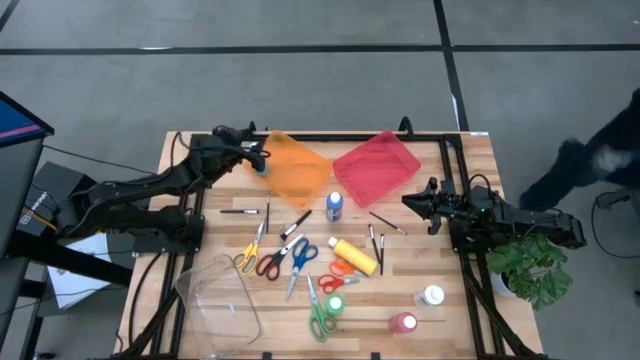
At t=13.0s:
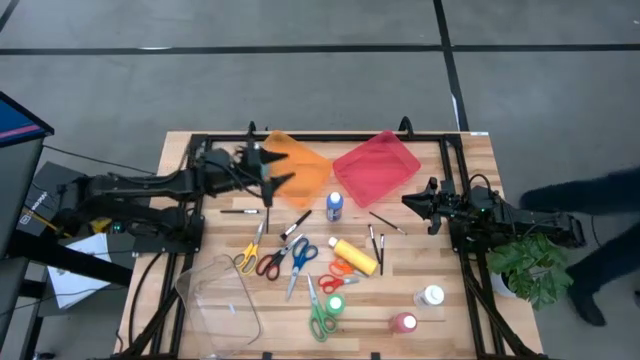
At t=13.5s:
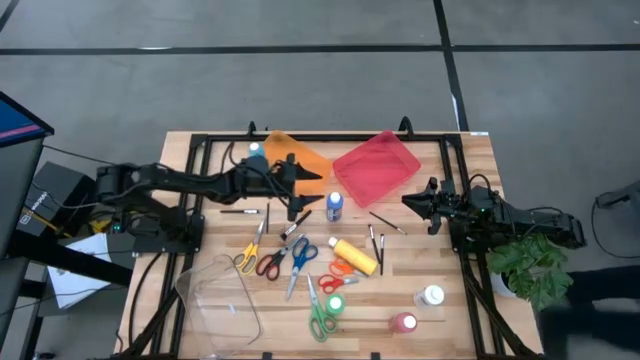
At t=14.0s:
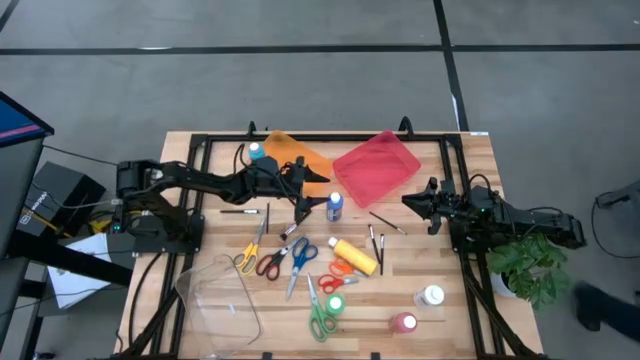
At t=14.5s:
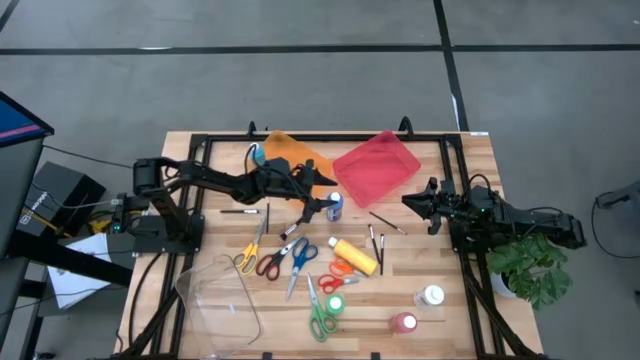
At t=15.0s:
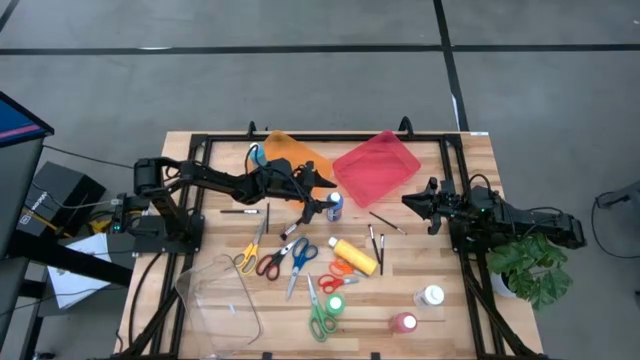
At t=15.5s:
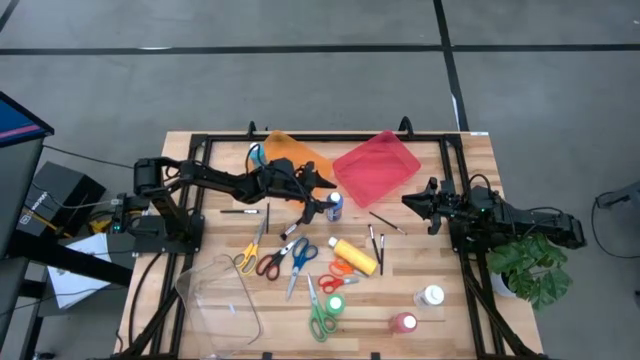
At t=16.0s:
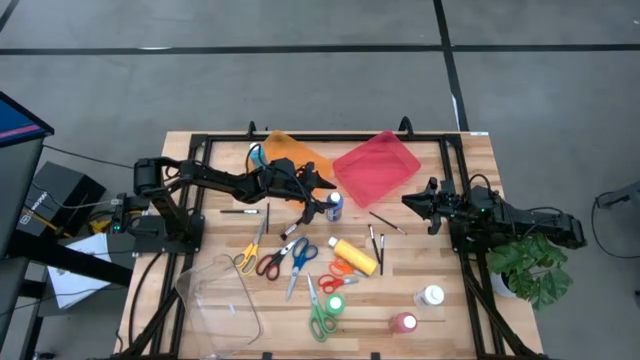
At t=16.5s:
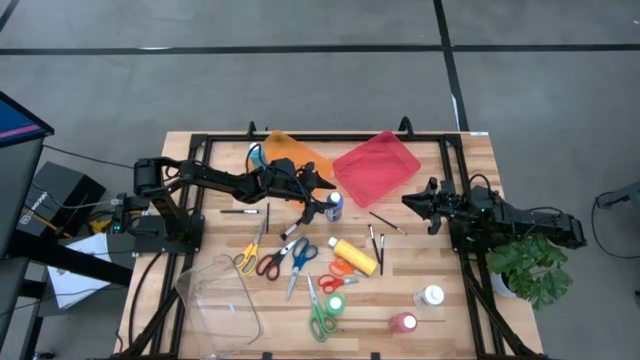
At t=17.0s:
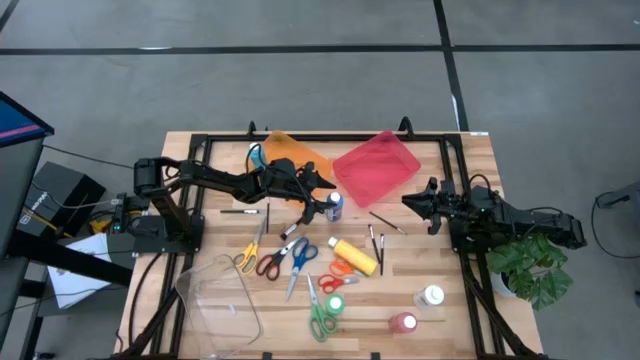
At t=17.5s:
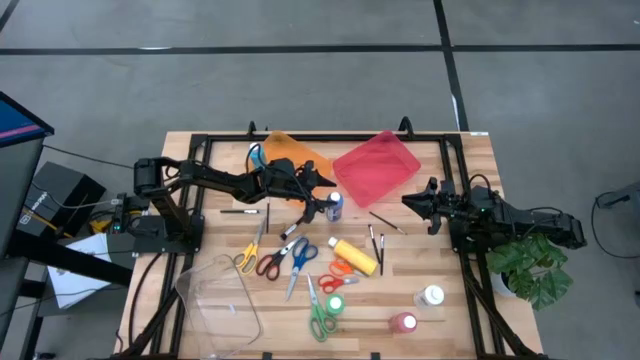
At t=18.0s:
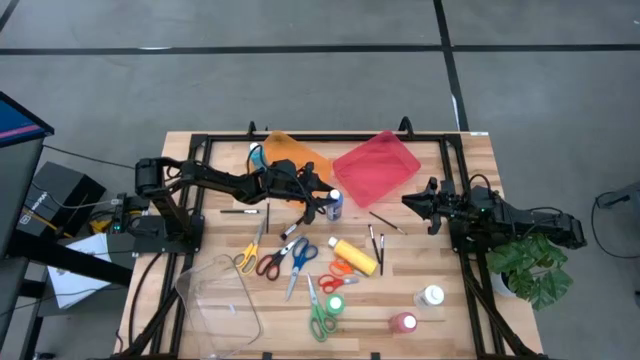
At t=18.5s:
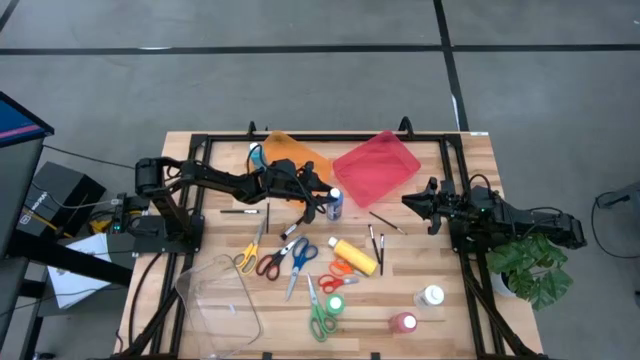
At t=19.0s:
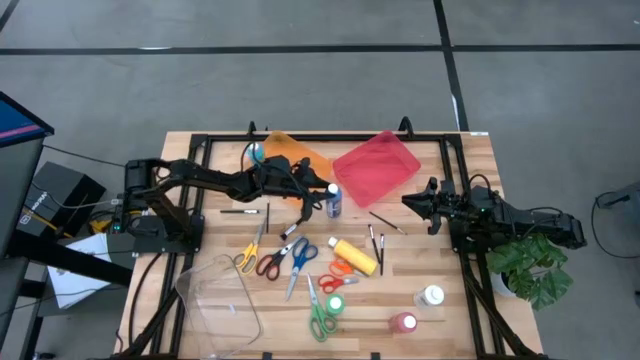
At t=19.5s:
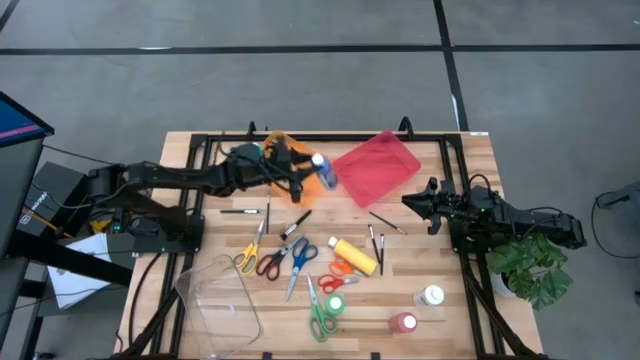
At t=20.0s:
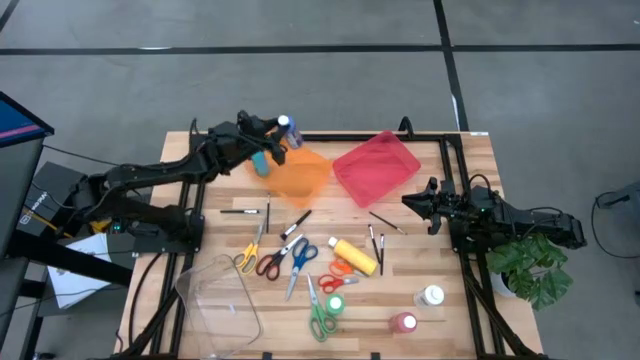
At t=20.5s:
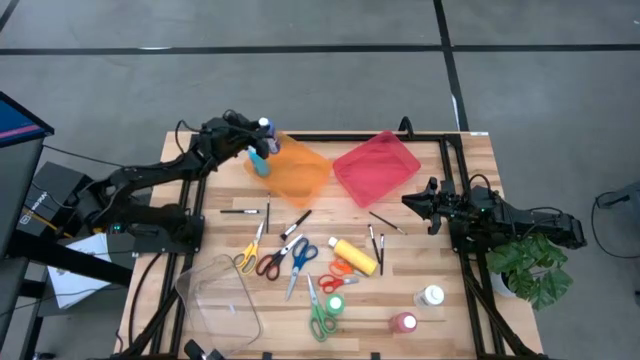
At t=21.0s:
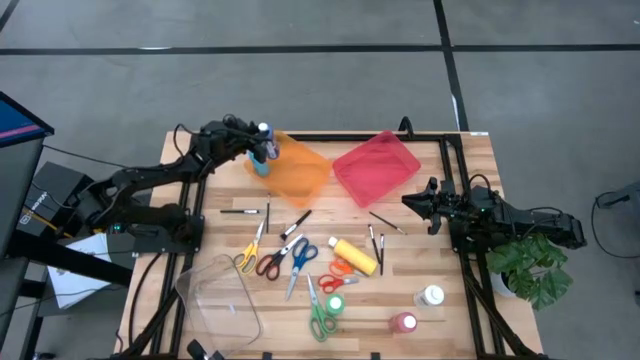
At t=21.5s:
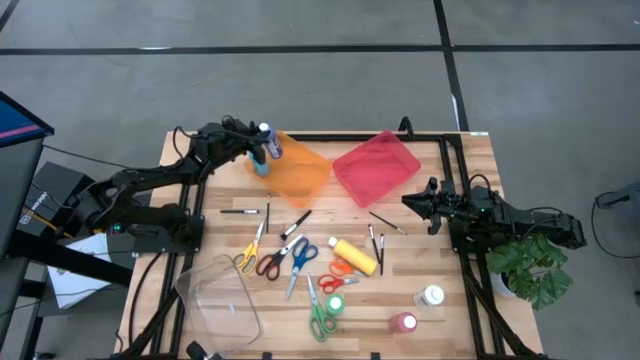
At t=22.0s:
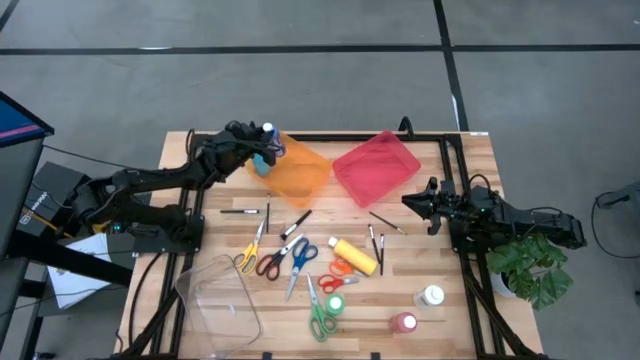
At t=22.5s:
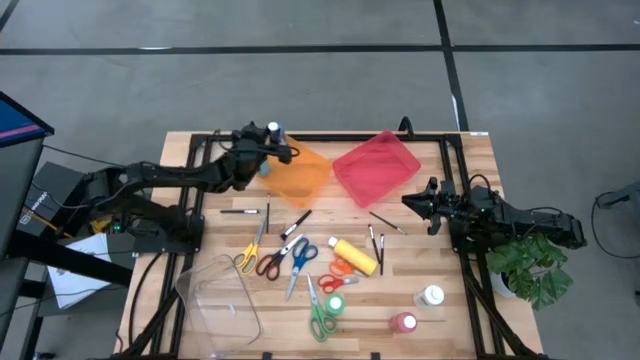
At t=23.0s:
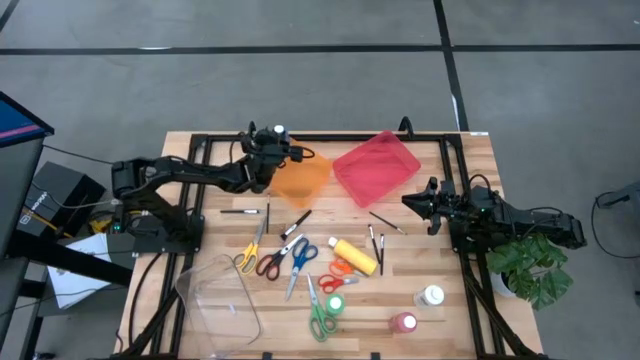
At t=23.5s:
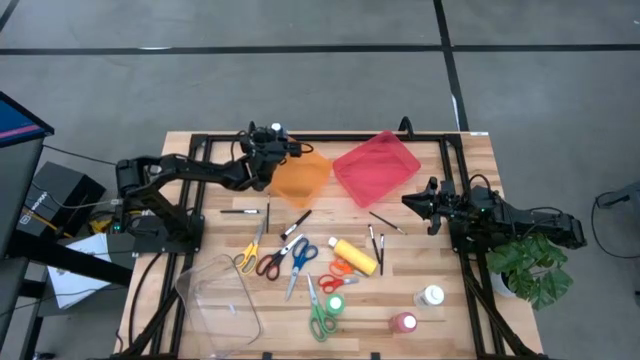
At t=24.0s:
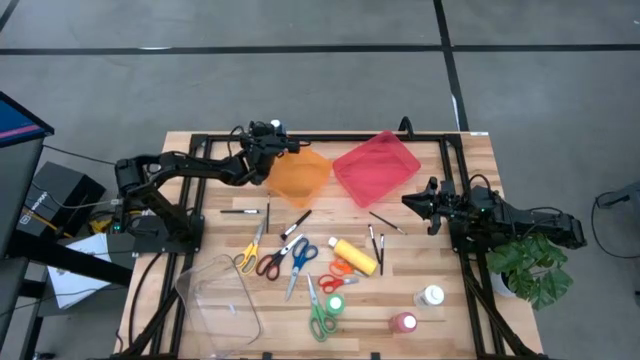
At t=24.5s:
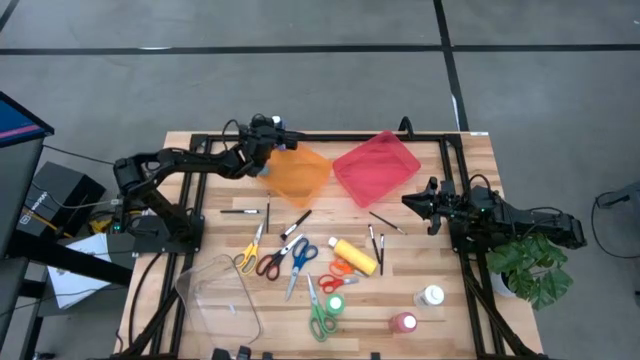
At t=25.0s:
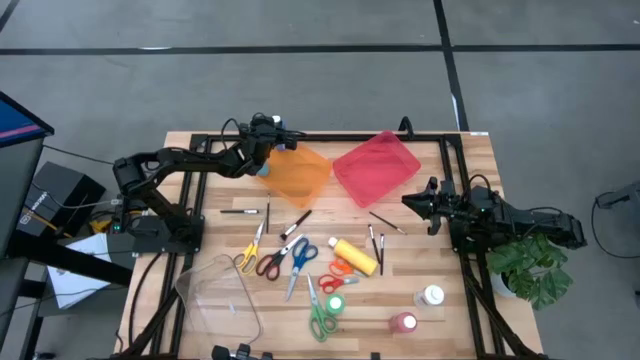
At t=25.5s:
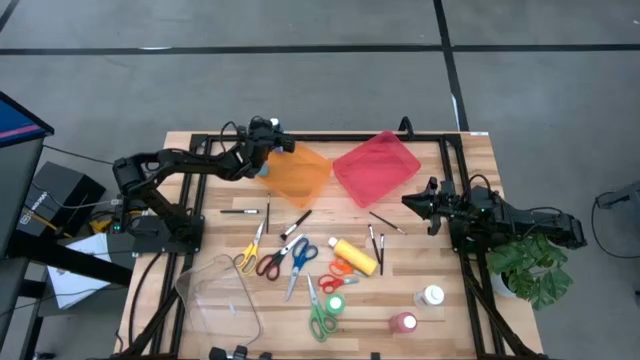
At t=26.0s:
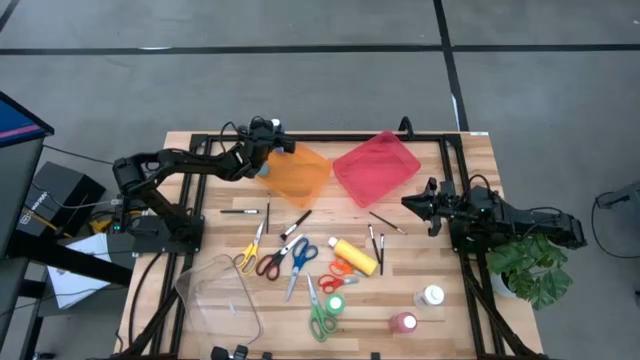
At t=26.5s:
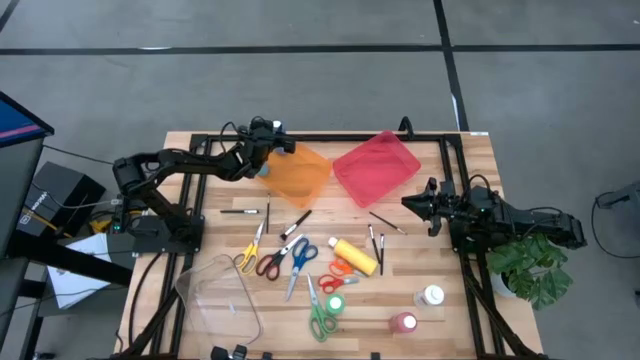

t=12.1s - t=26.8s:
Task: Pick & Place Paint Supplies
Put the blue paint bottle into the orange bin

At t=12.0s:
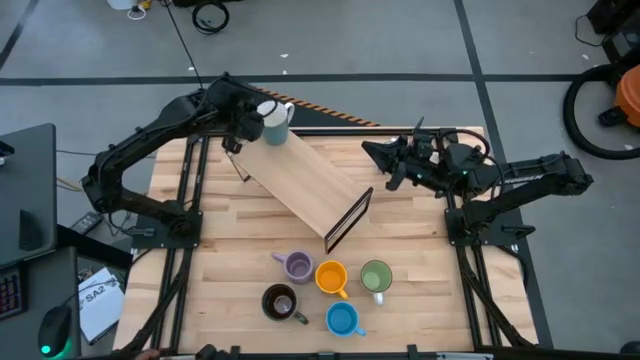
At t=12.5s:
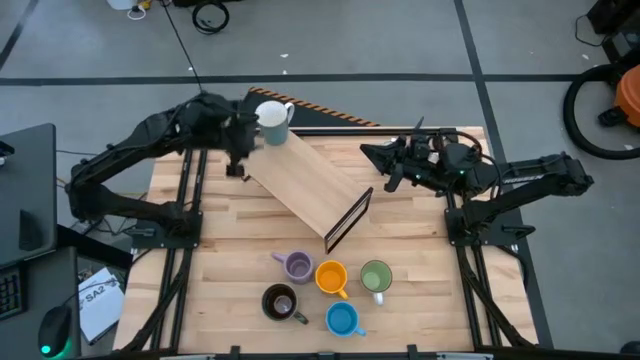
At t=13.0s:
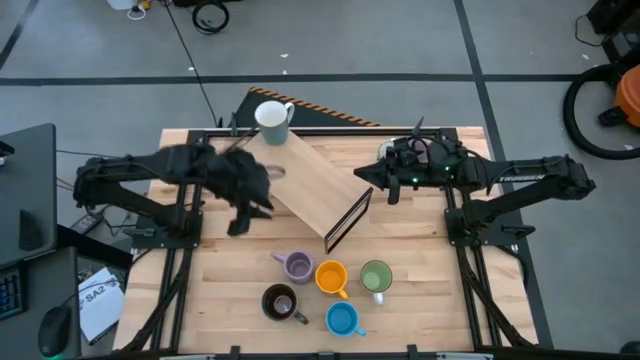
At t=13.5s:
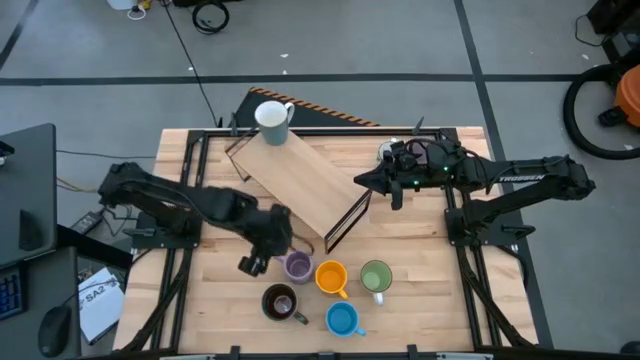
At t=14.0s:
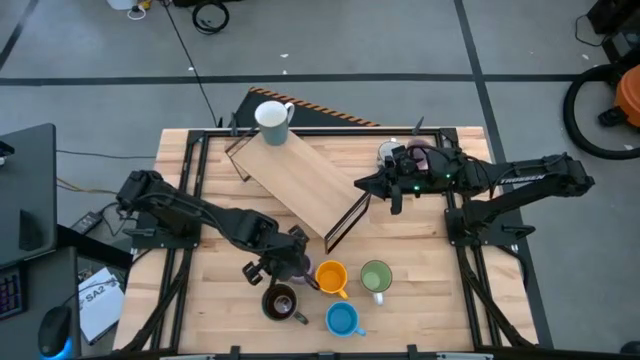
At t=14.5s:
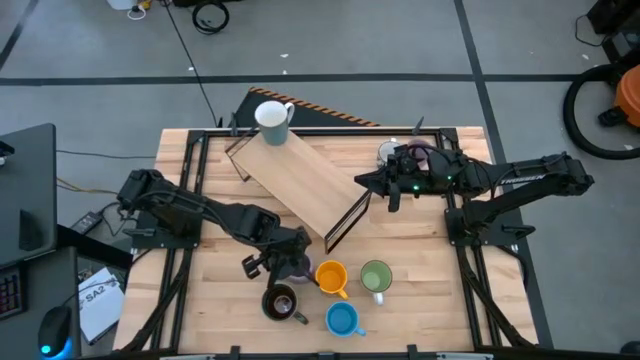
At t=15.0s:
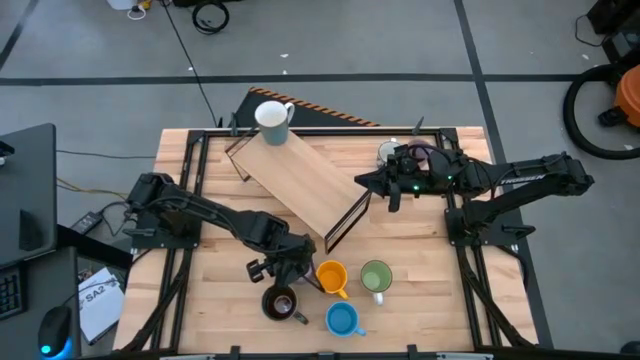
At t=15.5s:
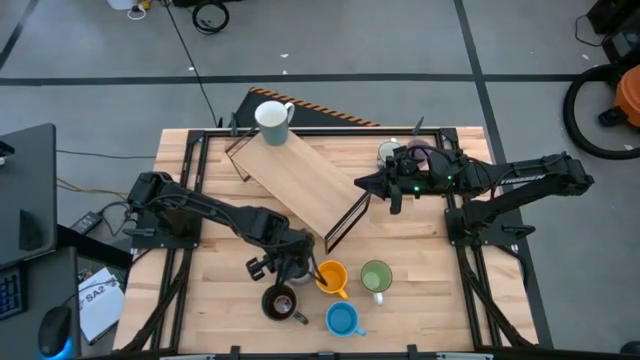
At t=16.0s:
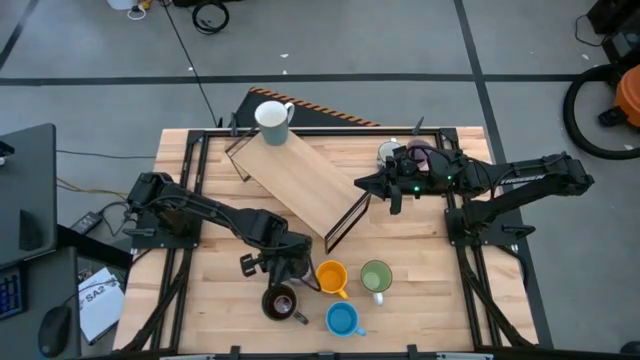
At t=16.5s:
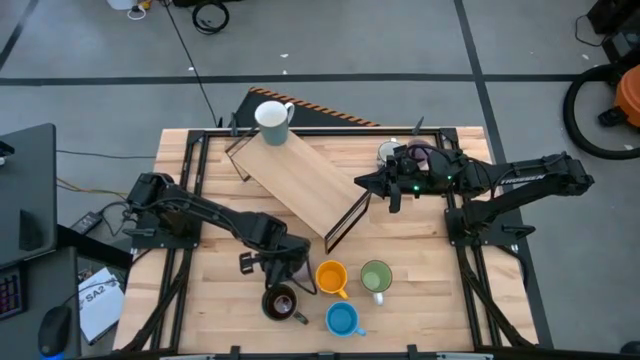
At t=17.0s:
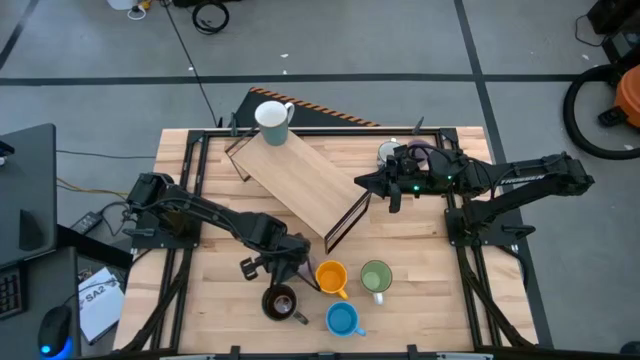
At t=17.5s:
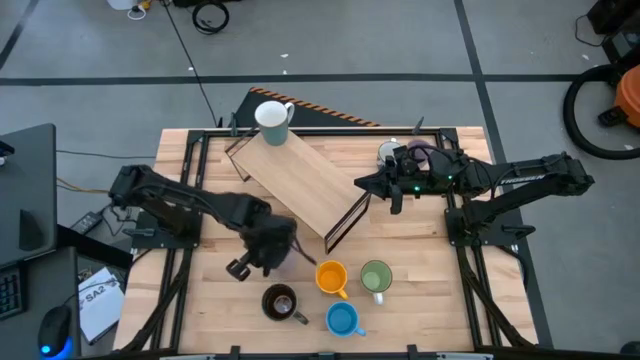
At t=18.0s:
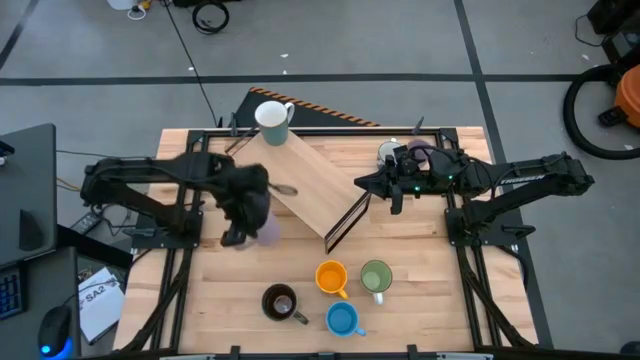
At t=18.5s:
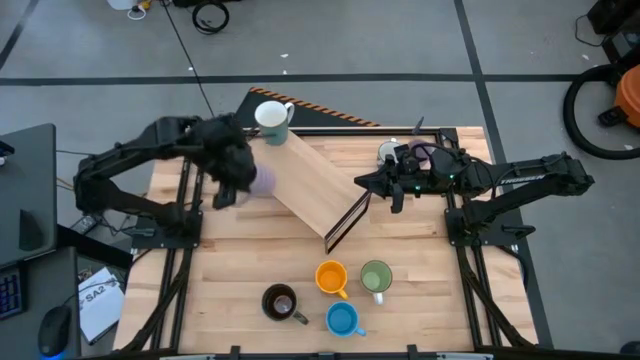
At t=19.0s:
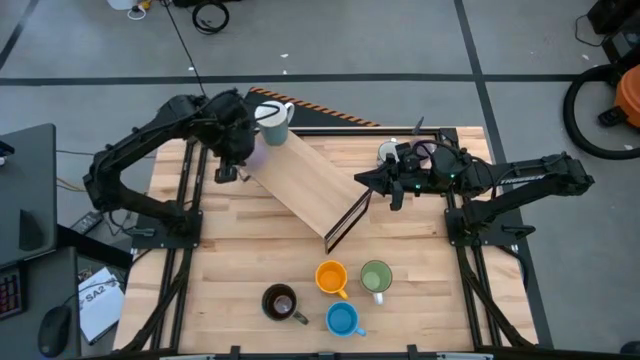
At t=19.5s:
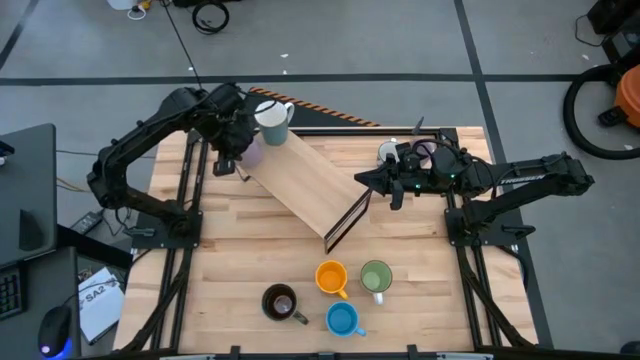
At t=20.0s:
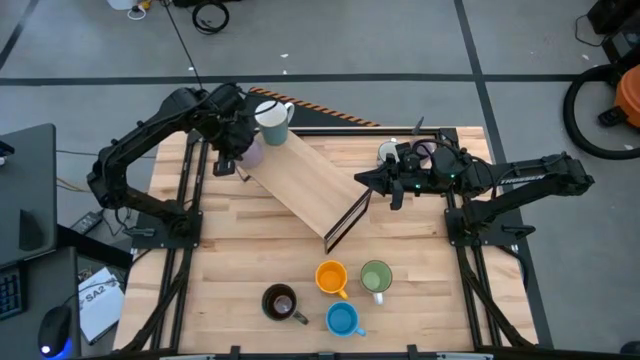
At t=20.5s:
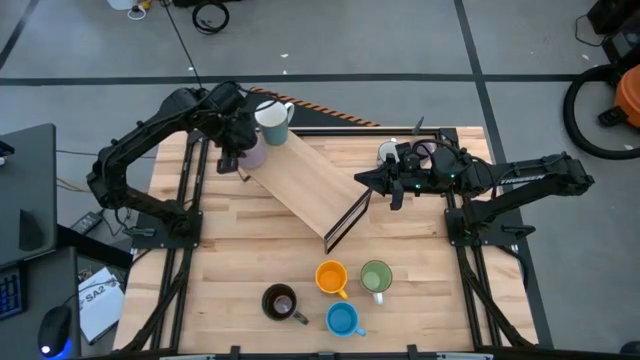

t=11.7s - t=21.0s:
Task: Place coffee mugs
Put the purple mug on the shelf
